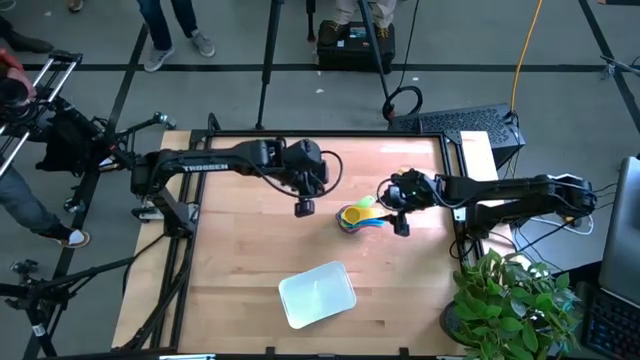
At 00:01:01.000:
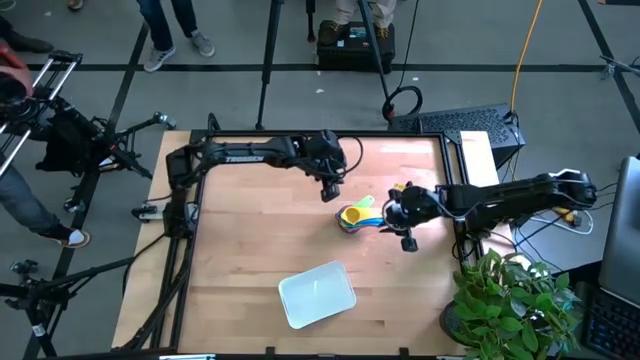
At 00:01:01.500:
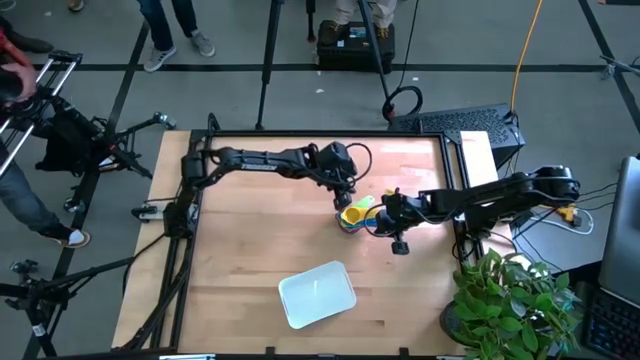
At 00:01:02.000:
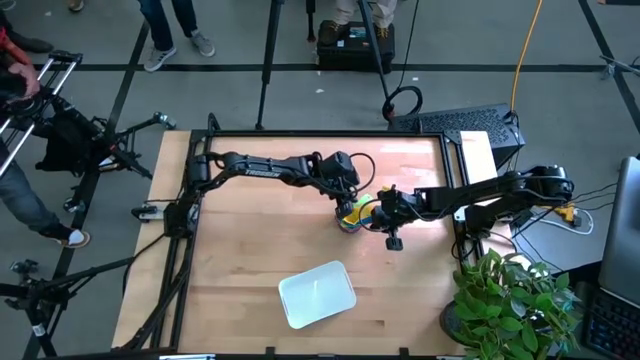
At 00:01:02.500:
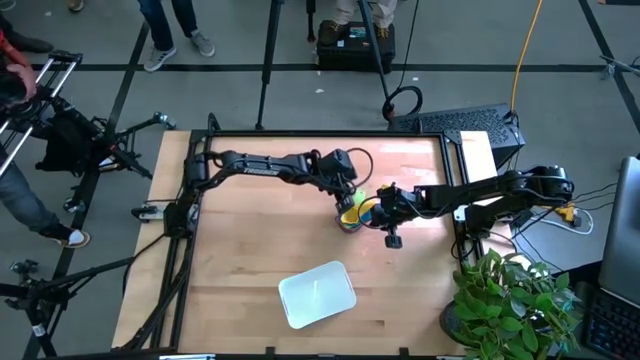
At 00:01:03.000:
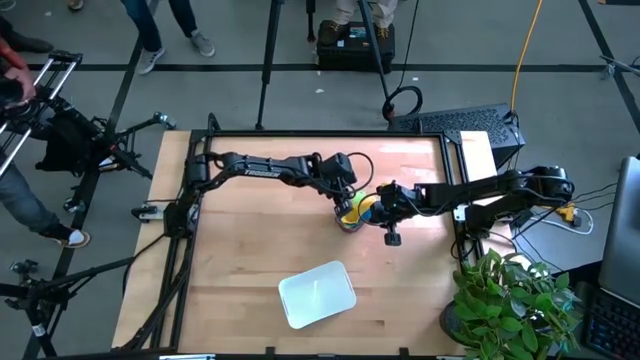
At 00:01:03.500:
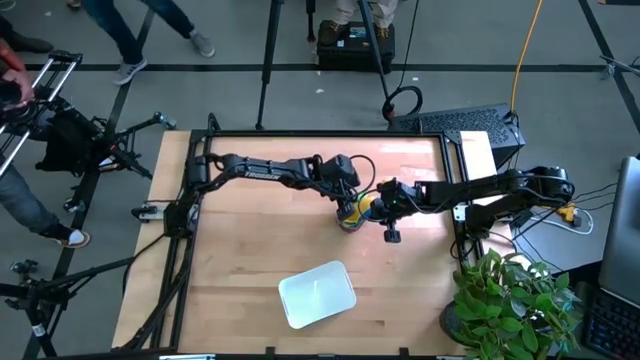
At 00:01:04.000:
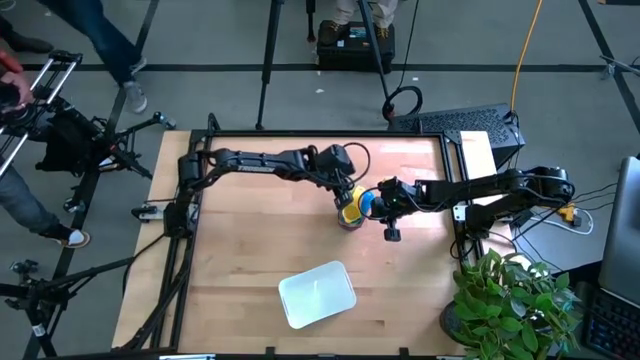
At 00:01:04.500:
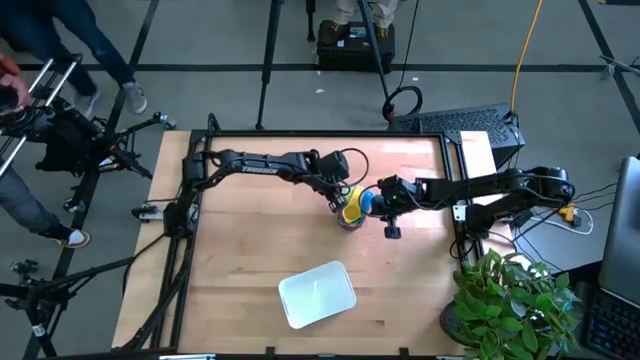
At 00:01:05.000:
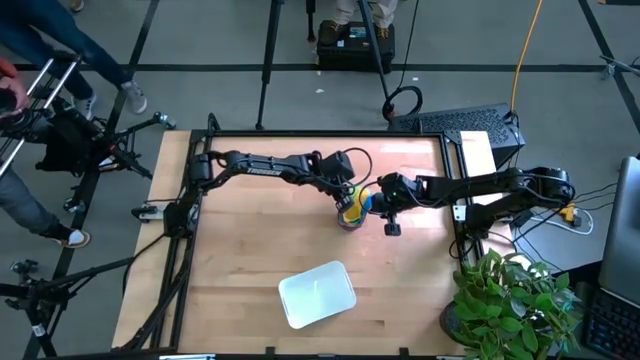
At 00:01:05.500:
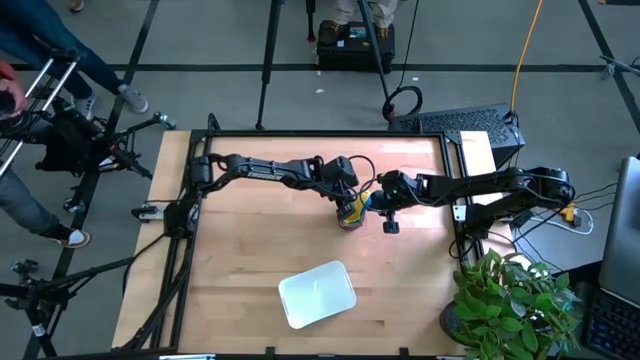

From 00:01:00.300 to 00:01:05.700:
Task: Nest measuring cups in basket
Adjust the stacked measuring cups

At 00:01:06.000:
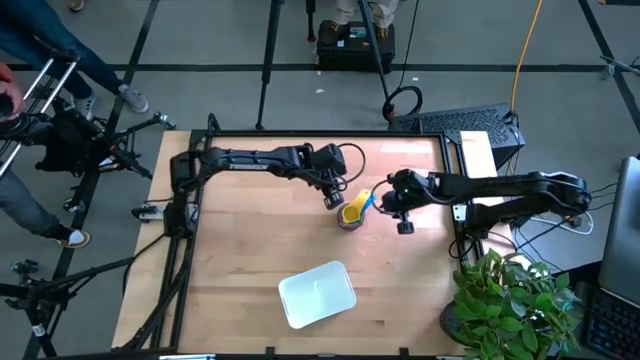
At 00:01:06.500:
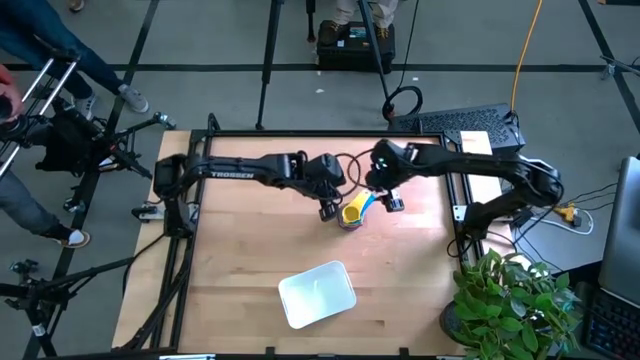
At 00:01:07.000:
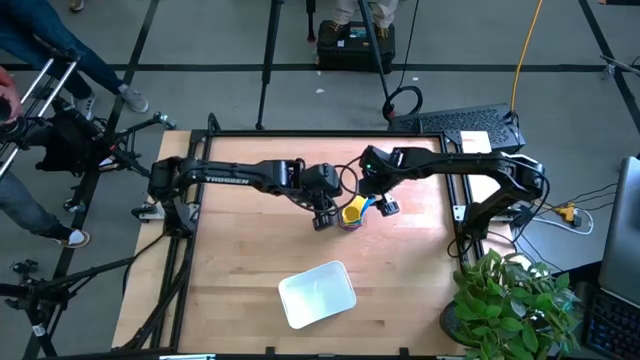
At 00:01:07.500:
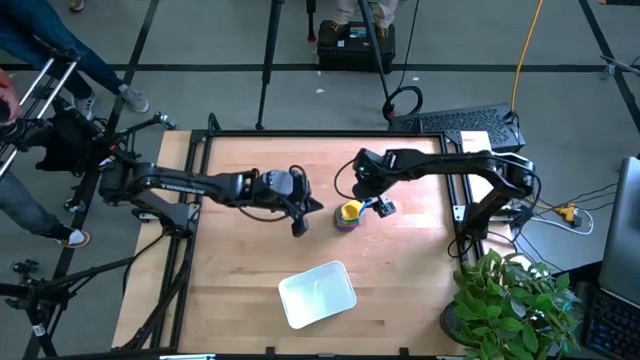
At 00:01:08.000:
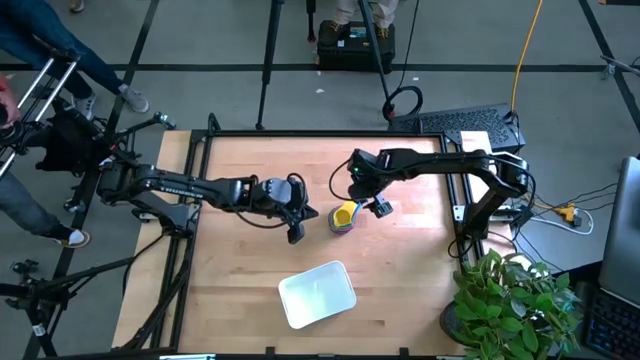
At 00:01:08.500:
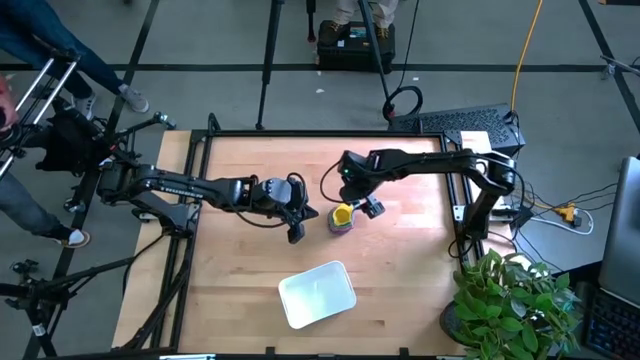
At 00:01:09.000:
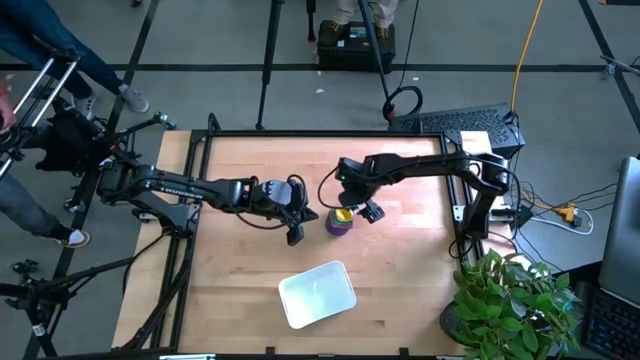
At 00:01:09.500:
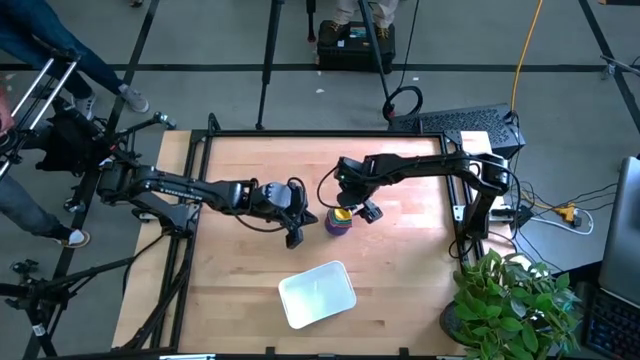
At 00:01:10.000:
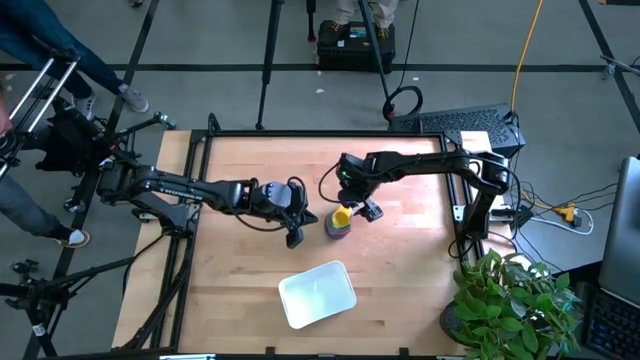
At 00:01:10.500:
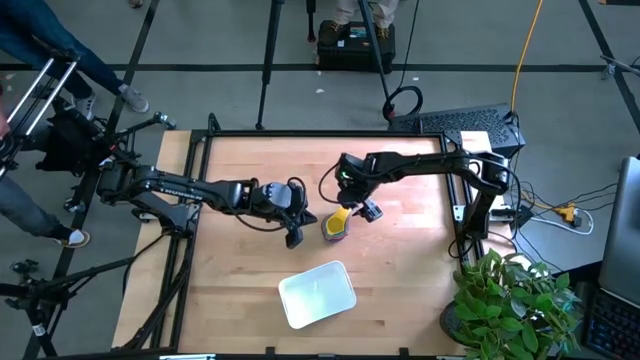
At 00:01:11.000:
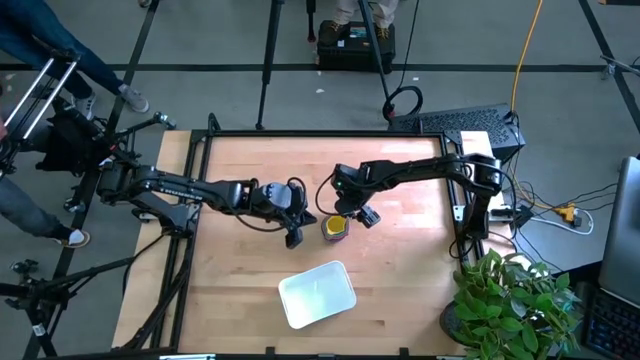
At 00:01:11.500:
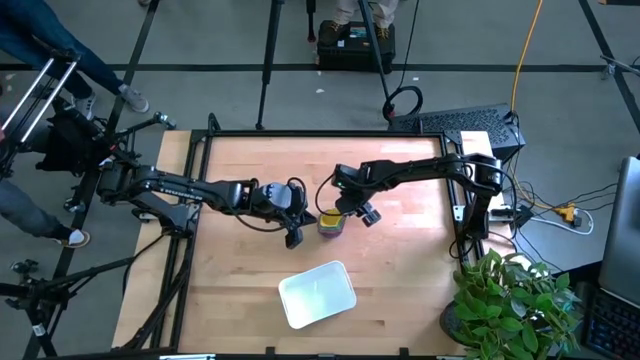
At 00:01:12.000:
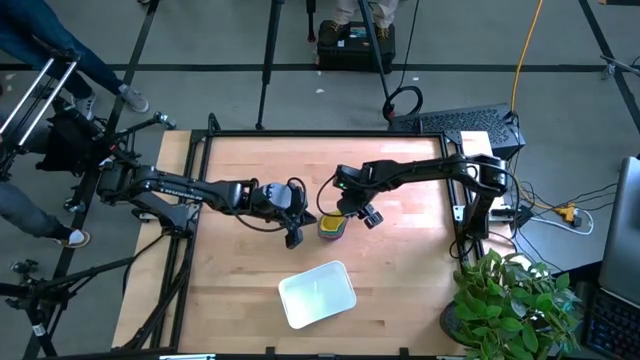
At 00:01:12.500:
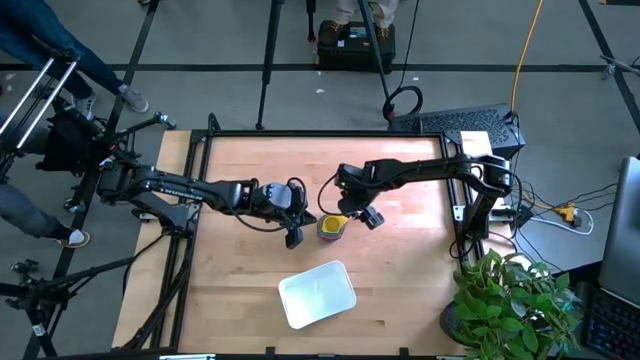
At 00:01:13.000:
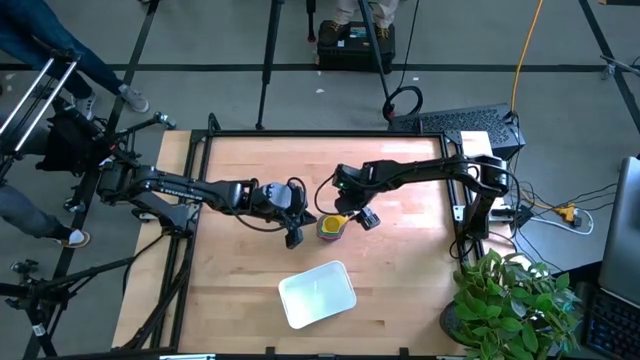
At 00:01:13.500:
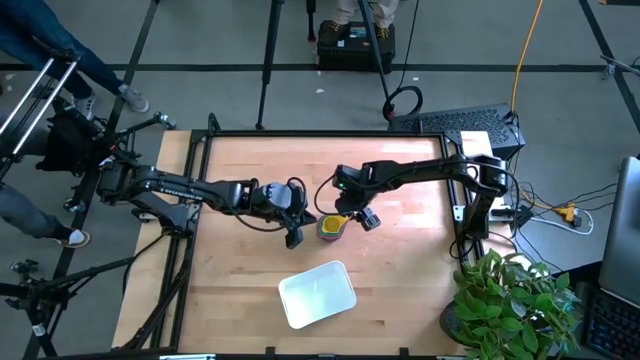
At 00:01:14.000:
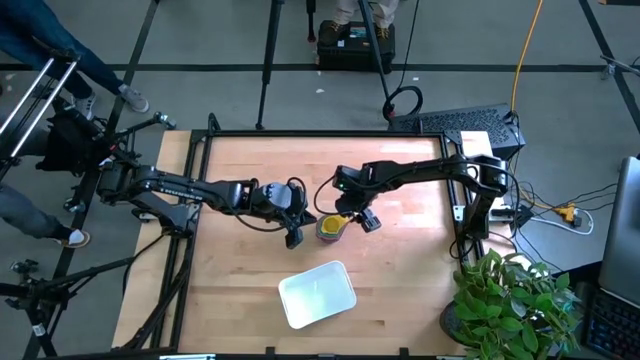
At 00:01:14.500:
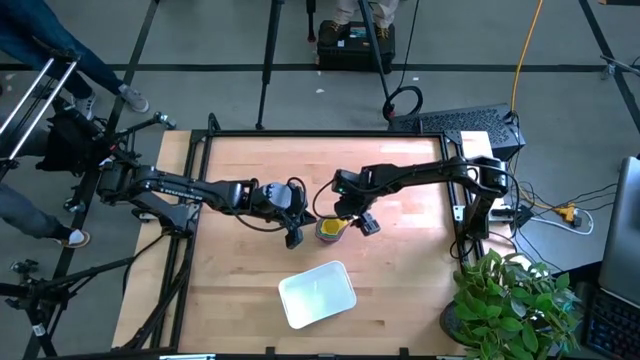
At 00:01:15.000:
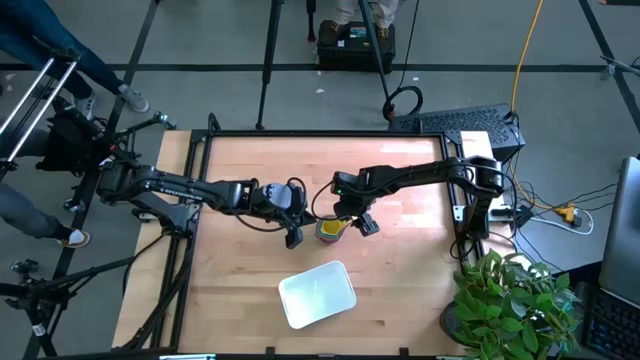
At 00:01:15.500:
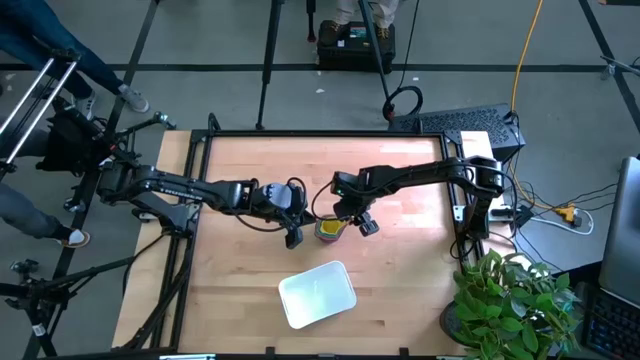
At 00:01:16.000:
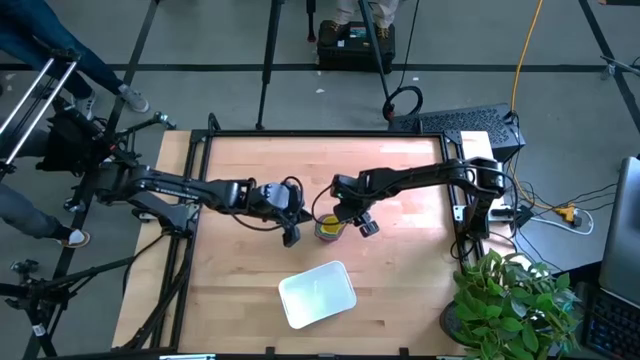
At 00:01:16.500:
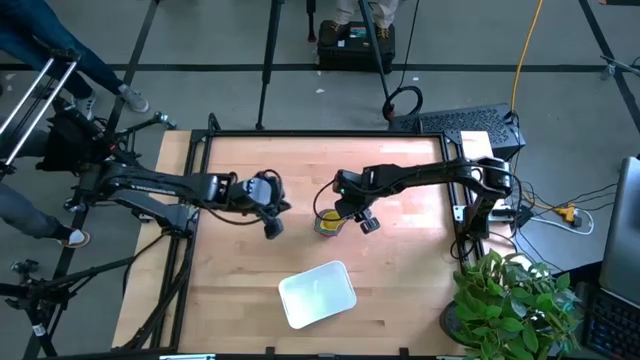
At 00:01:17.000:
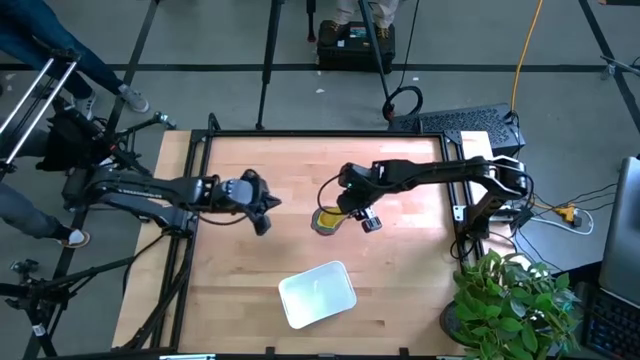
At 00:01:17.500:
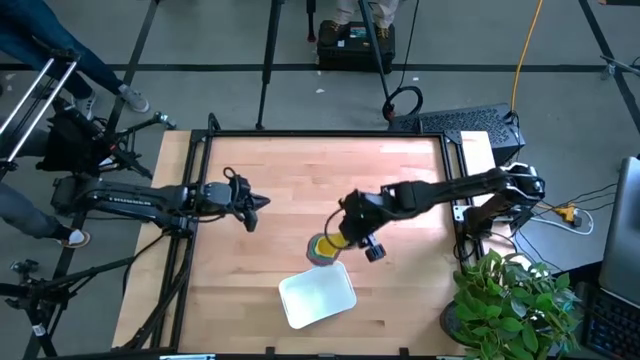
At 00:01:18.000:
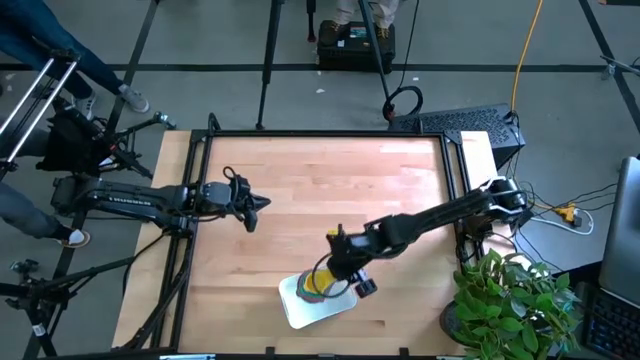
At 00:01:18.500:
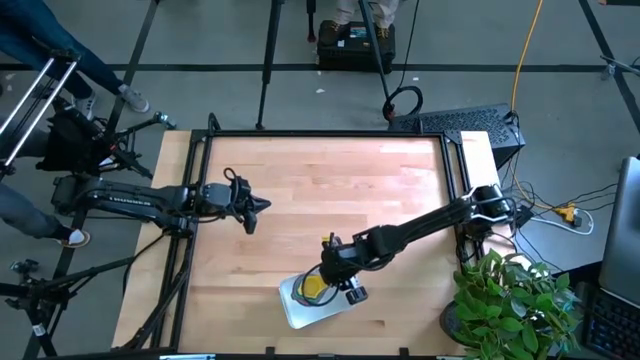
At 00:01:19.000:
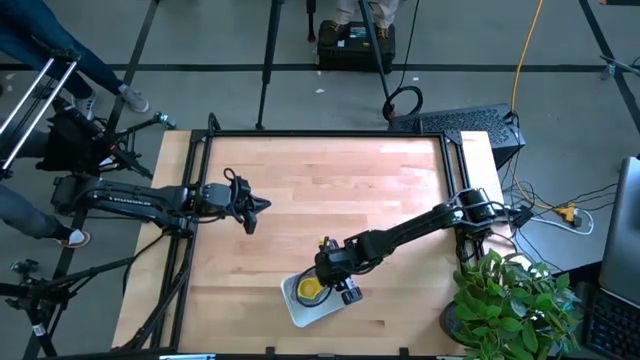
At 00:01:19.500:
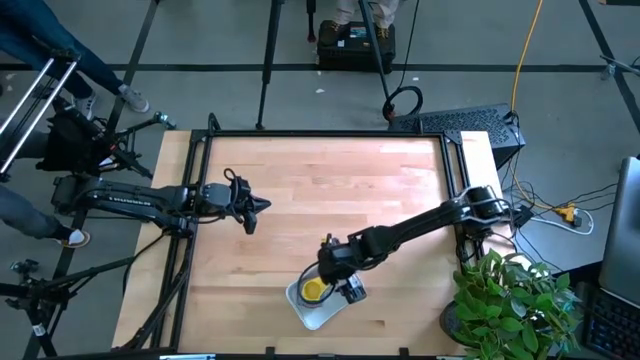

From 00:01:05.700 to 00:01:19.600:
Put the stacked measuring cups into the white bin

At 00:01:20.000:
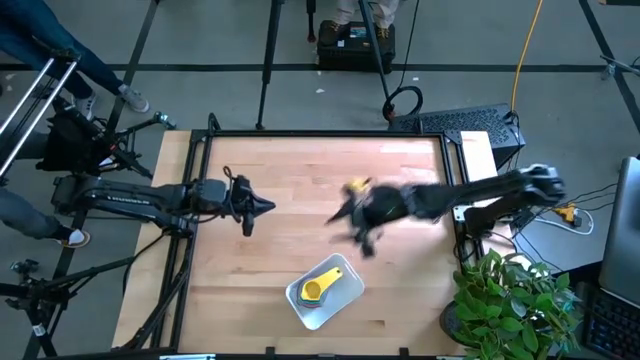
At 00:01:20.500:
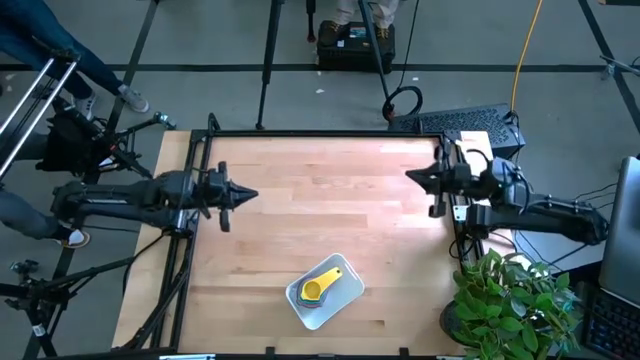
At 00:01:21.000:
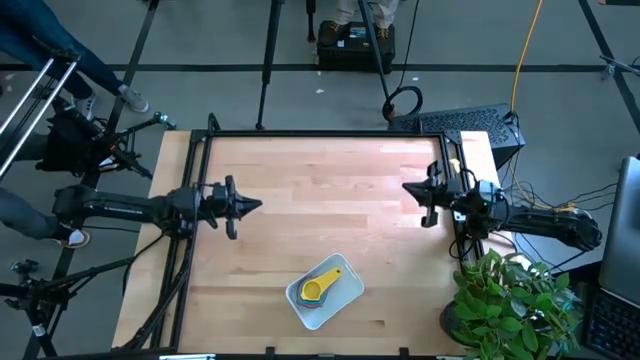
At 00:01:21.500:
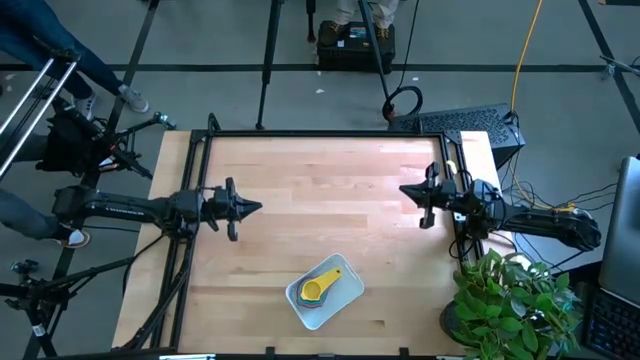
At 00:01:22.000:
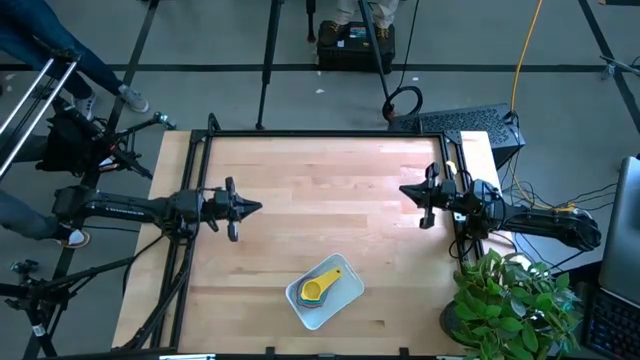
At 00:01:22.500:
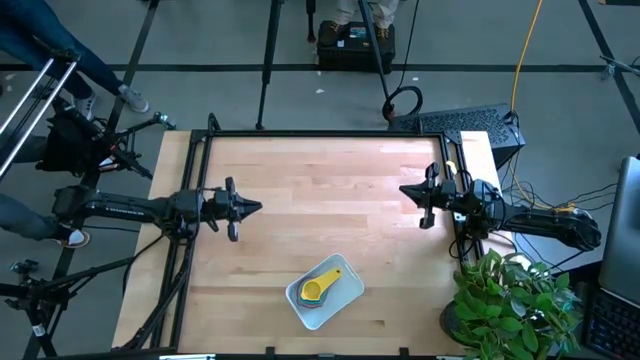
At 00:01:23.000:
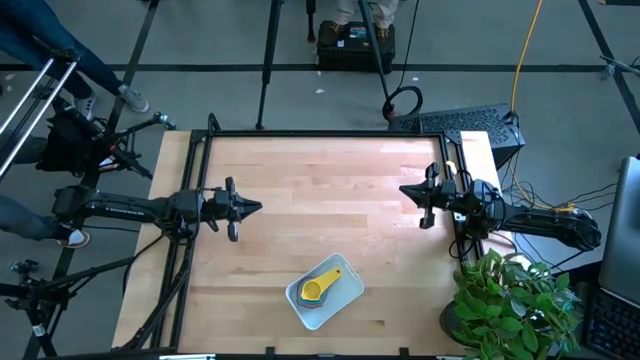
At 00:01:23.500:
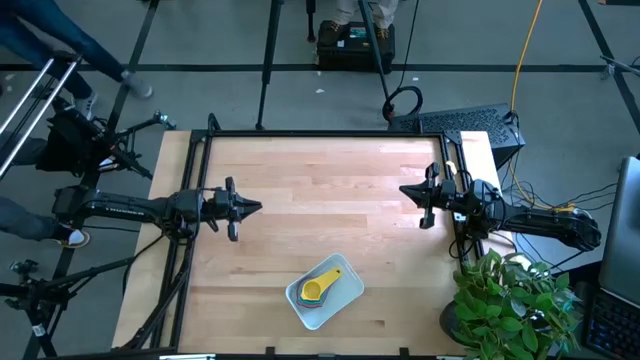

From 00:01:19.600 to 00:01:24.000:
Return to Home Position
